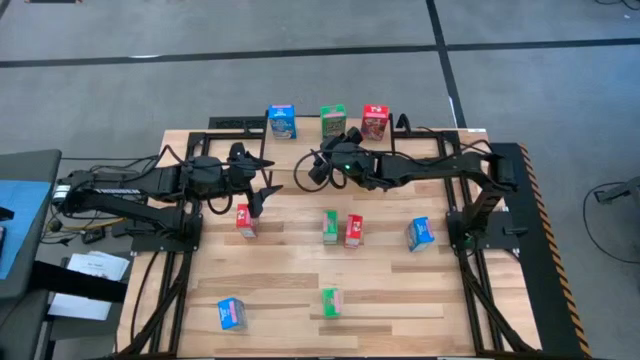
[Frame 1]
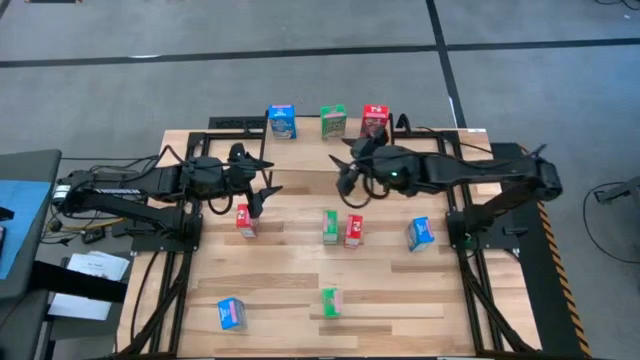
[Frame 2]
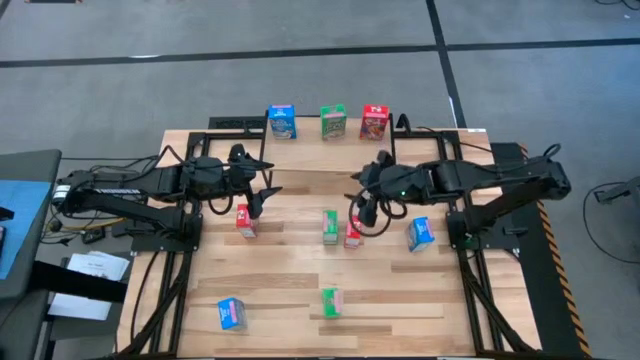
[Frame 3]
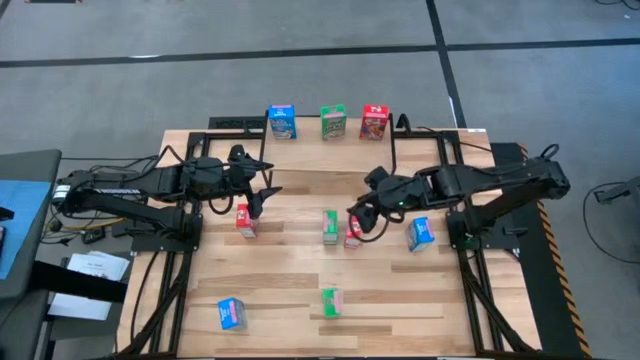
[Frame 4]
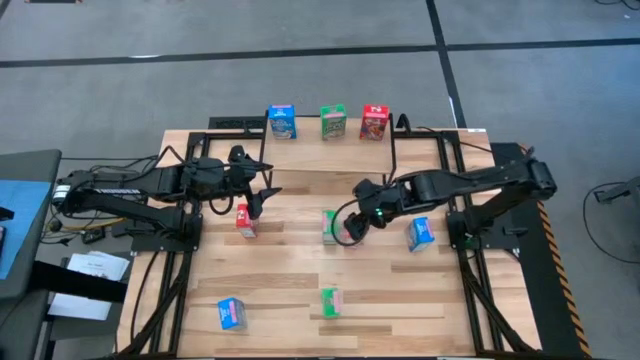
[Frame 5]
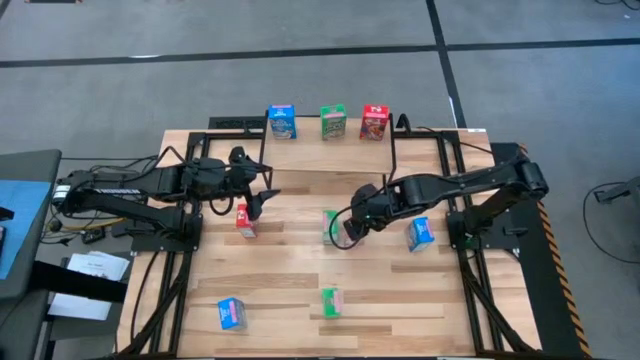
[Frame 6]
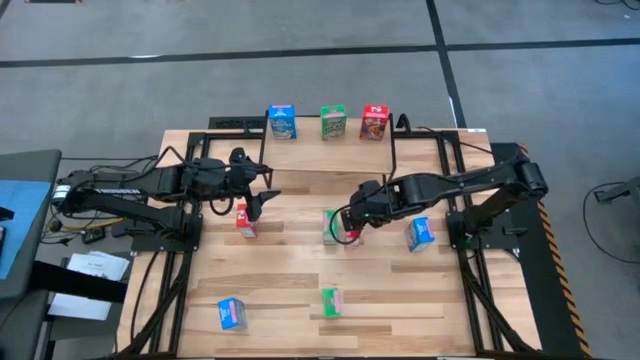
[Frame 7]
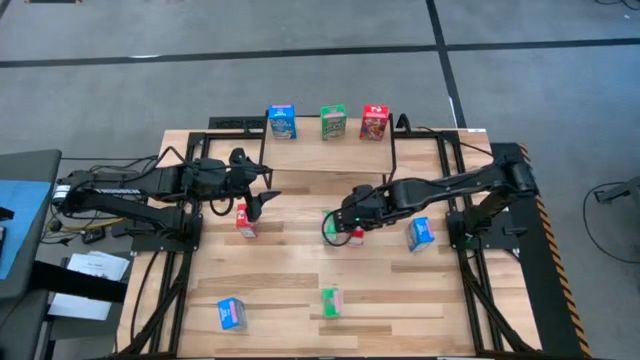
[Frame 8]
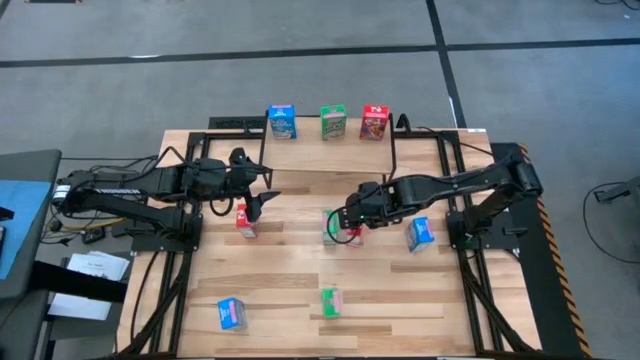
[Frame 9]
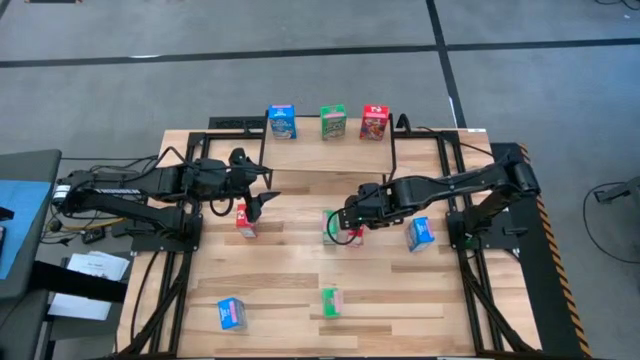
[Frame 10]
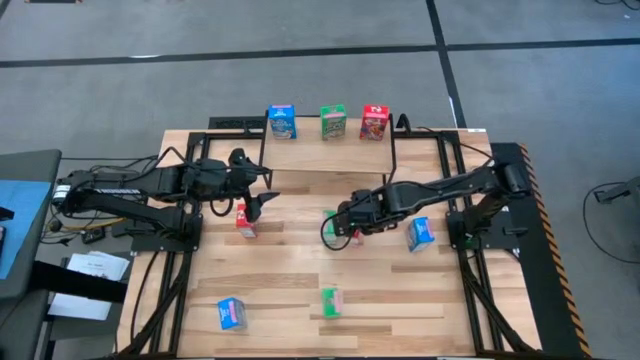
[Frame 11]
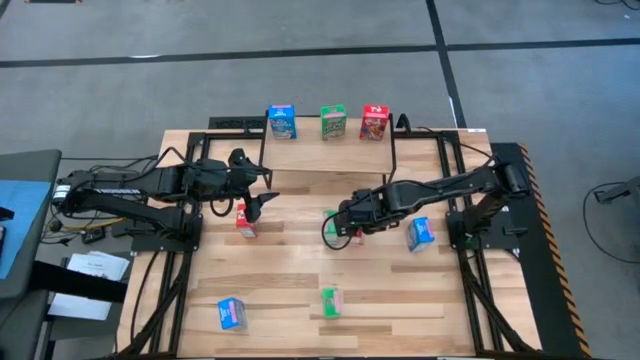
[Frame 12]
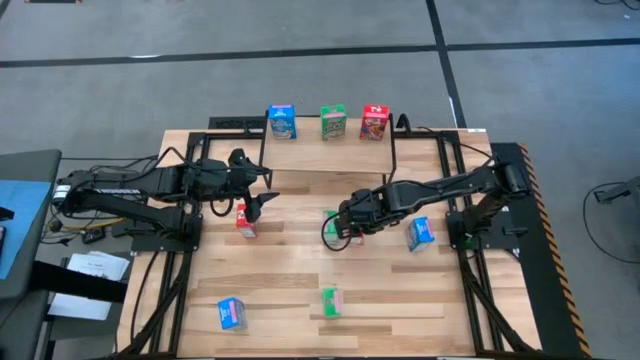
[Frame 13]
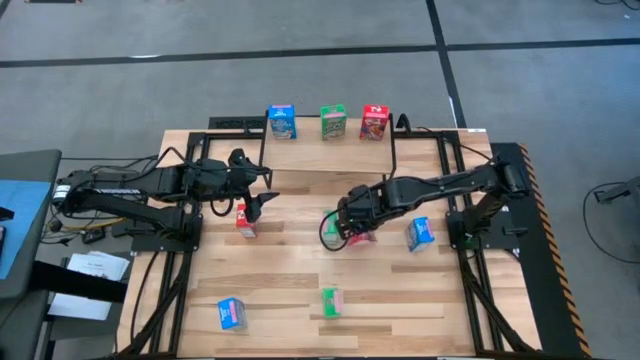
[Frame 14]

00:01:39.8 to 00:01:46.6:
Task: Stack cereal on shelf
Put the right red cereal box on the shelf aligned with the other red cereal box

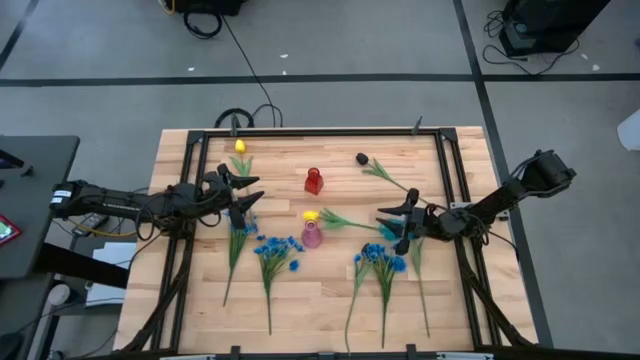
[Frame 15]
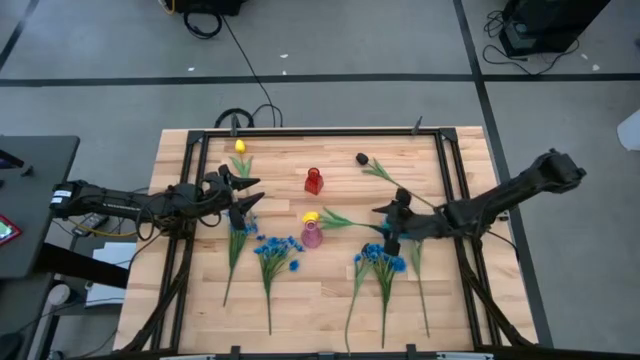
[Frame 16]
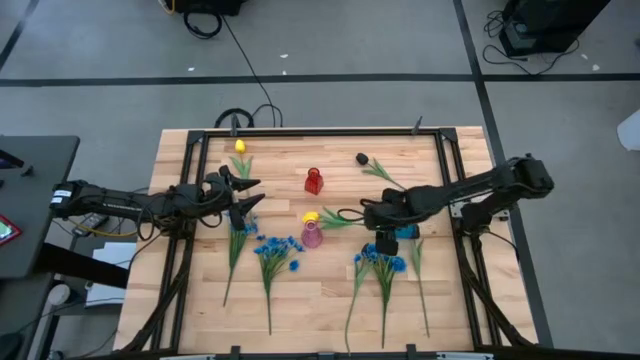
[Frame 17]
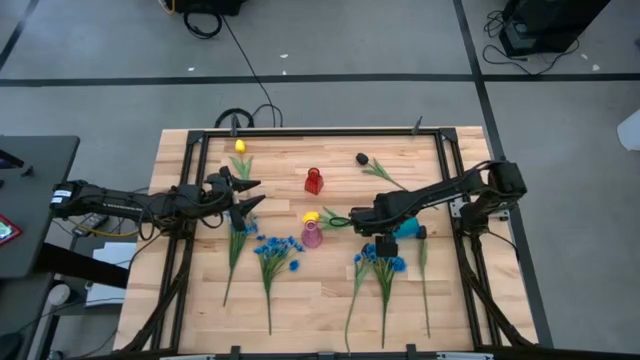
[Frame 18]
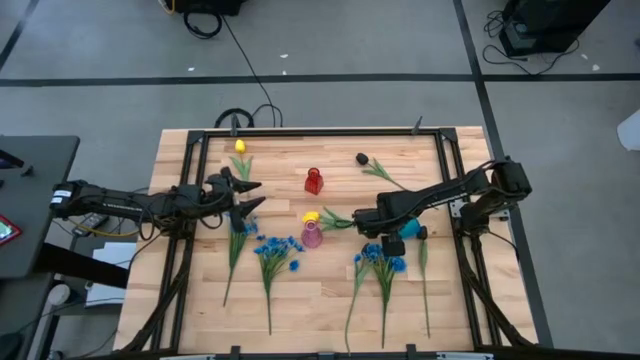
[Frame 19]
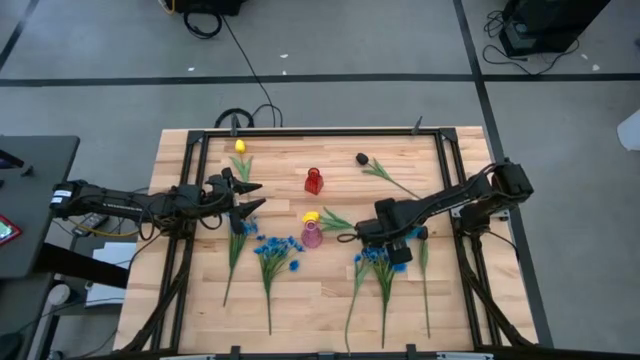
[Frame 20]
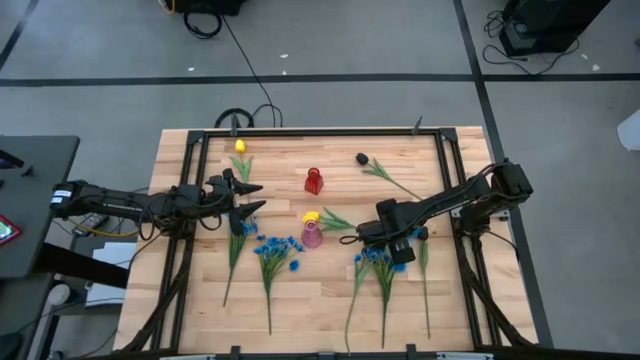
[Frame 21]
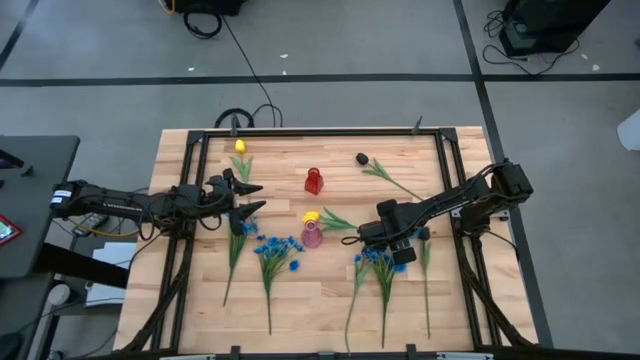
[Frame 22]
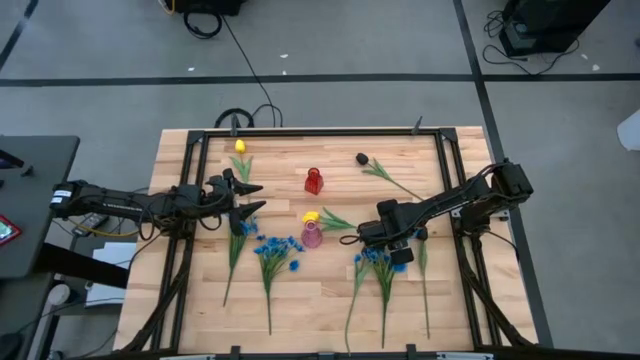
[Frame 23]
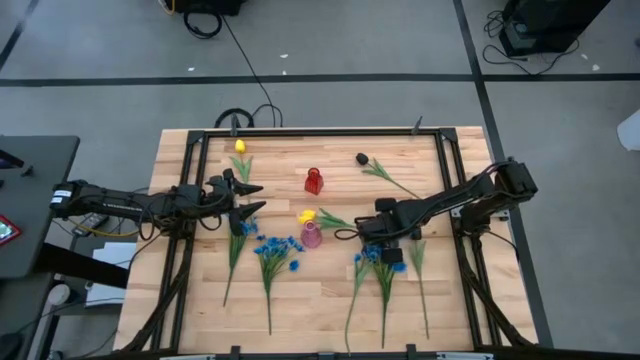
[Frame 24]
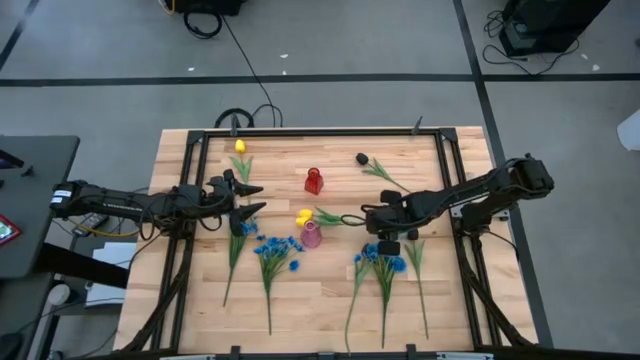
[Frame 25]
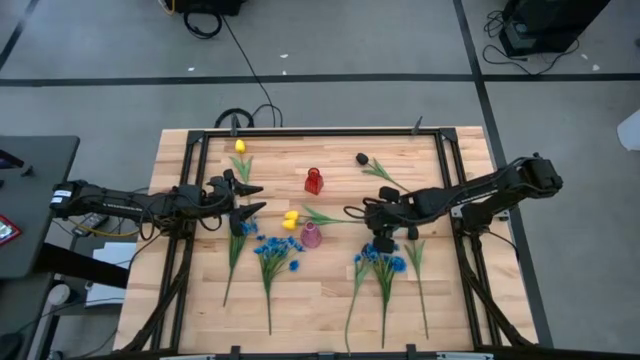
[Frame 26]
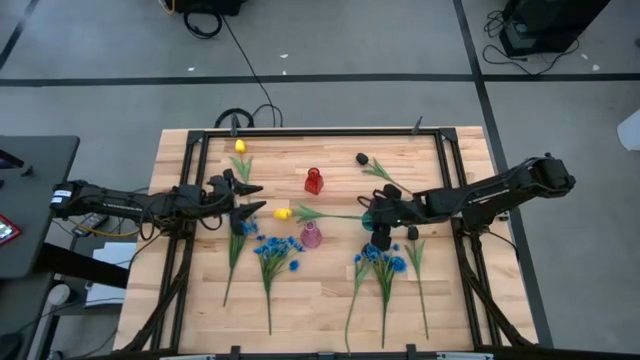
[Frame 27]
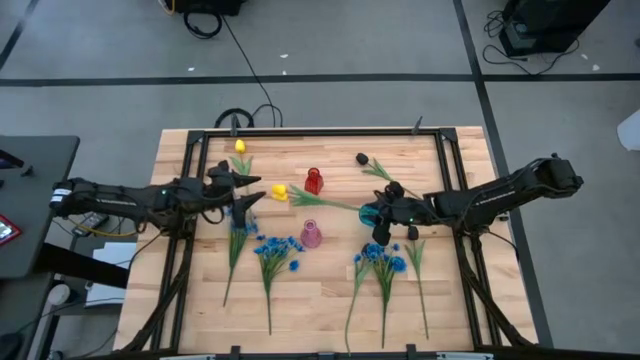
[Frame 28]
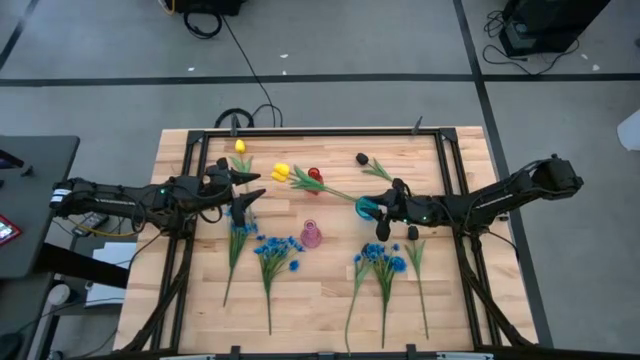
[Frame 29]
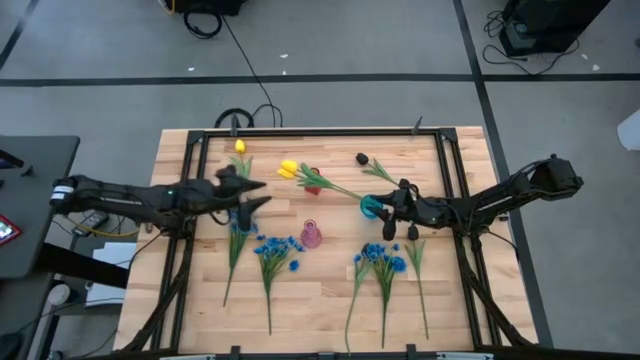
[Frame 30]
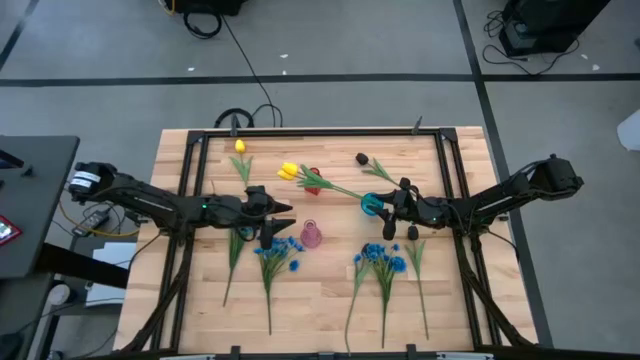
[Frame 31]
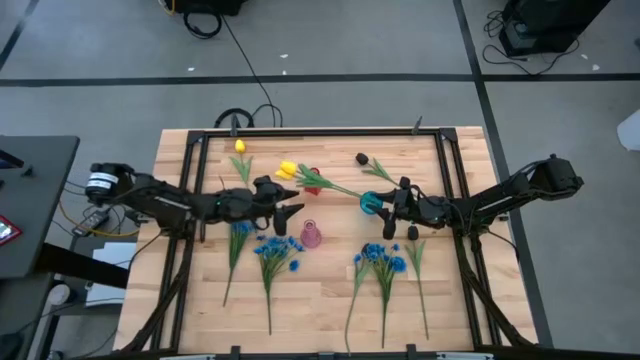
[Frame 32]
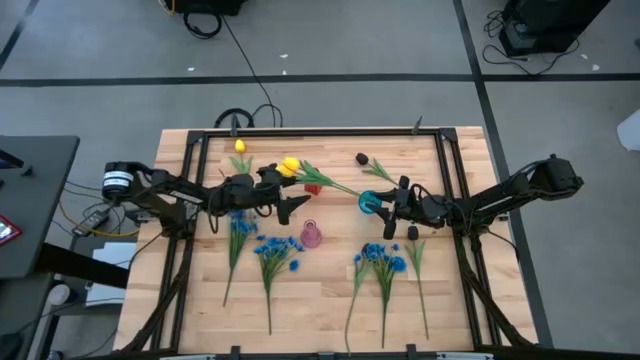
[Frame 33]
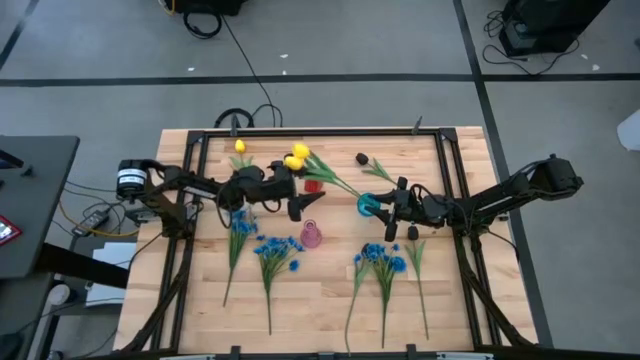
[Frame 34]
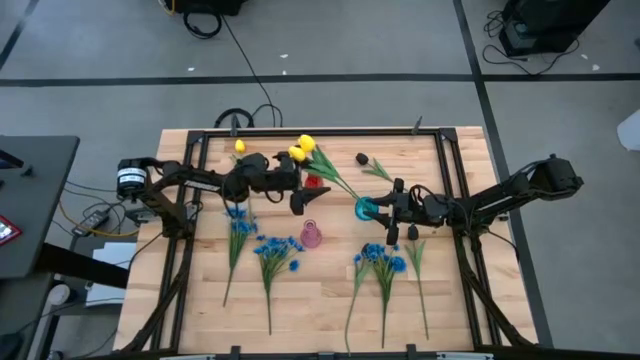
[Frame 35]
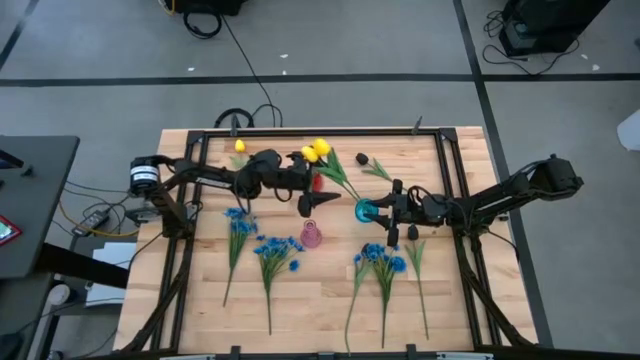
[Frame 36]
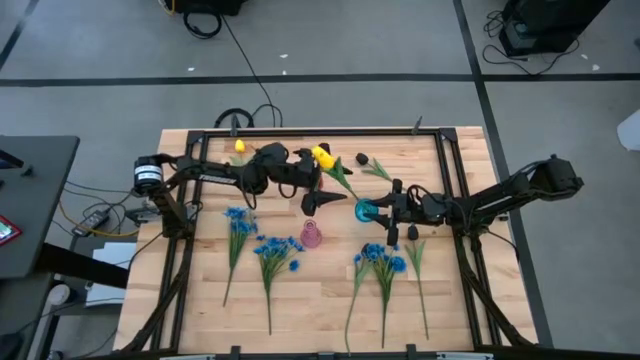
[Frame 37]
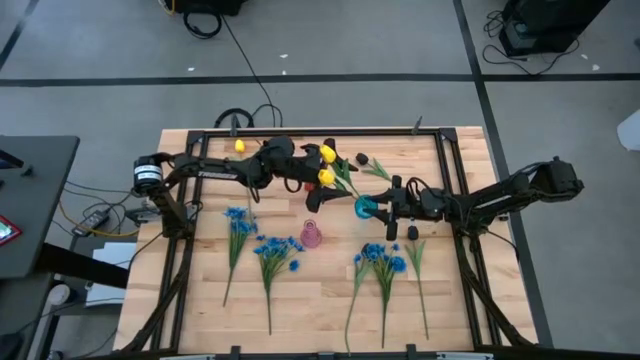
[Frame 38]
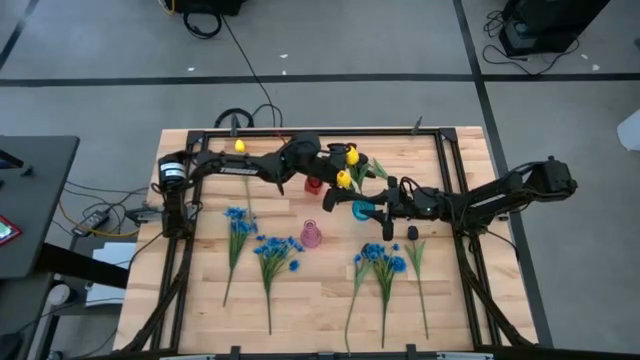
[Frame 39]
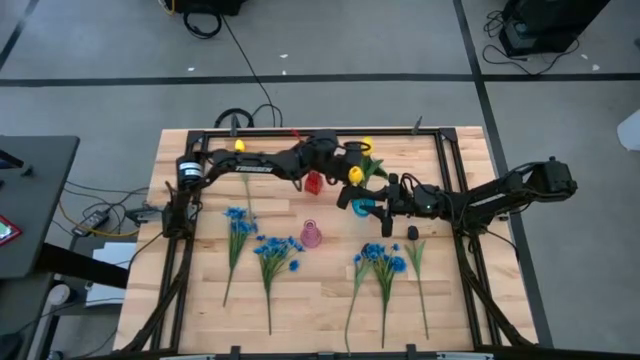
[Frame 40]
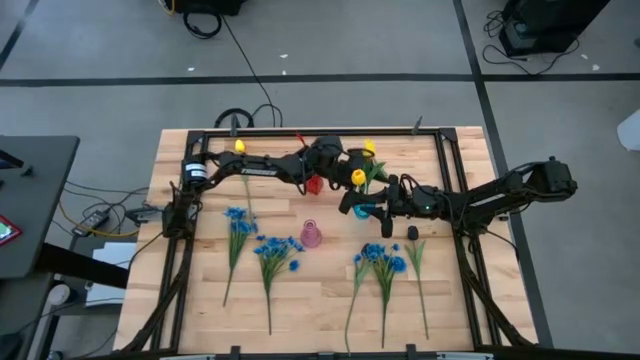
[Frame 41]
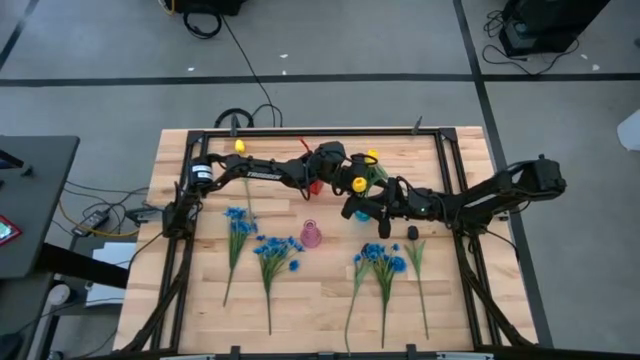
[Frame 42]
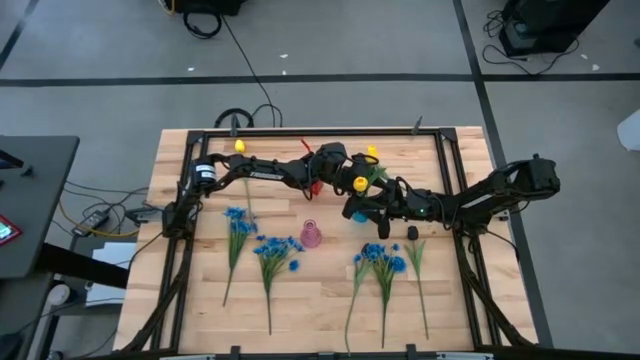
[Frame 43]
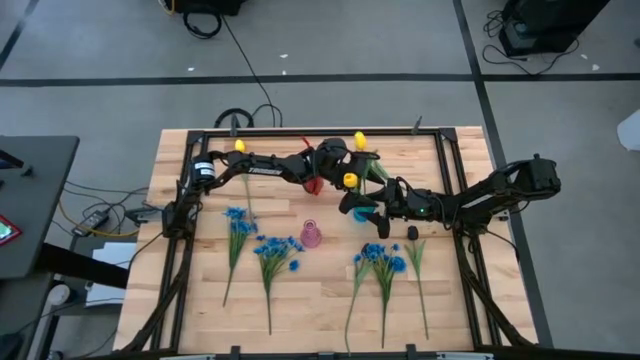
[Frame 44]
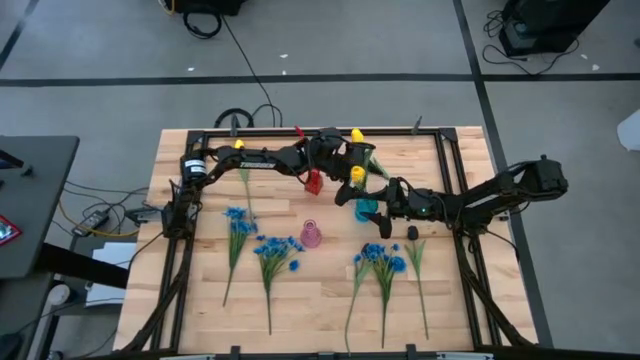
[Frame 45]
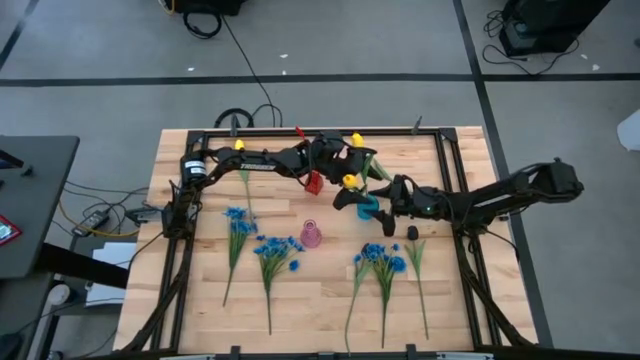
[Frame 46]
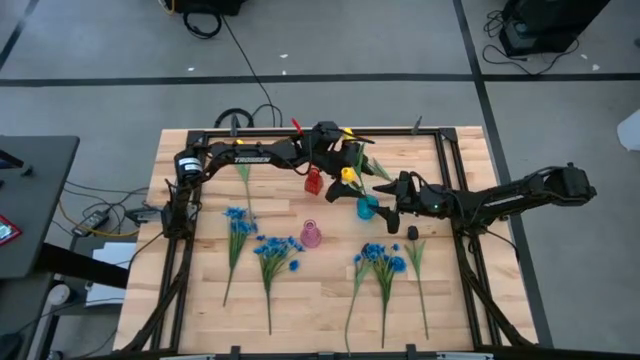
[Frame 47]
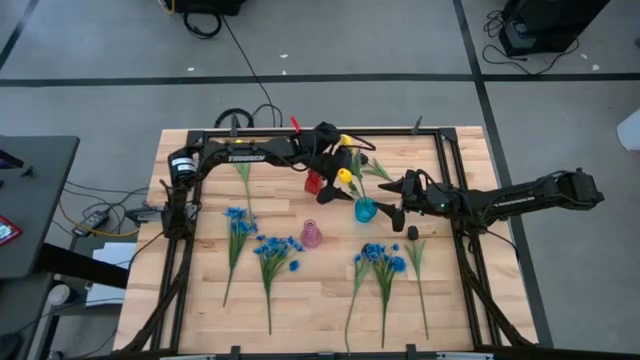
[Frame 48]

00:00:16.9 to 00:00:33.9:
Task: Sort flowers into vase by color
Put the blue vase containing the yellow flowers on the center of the table upright
